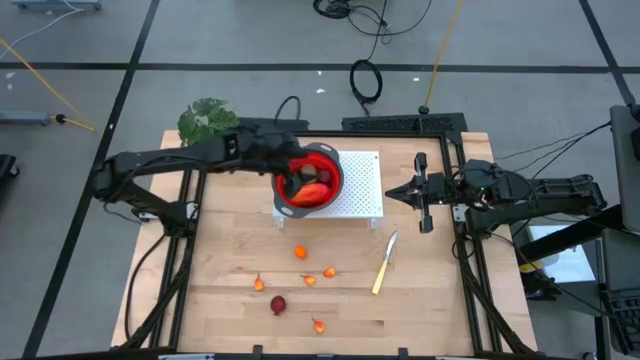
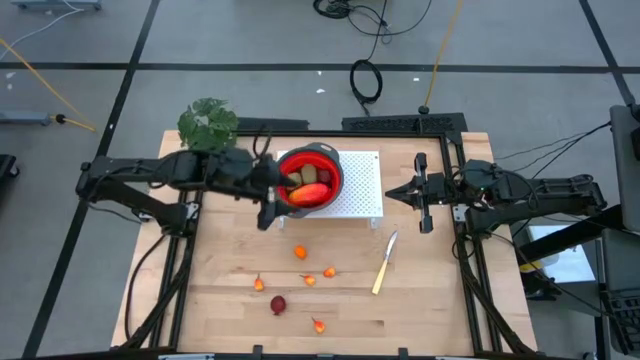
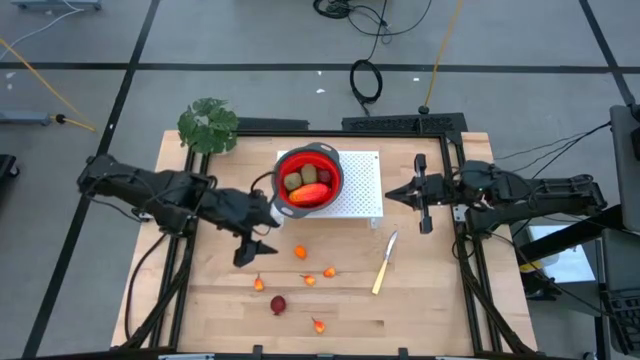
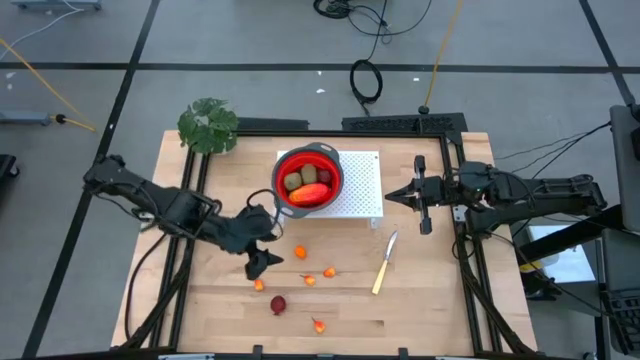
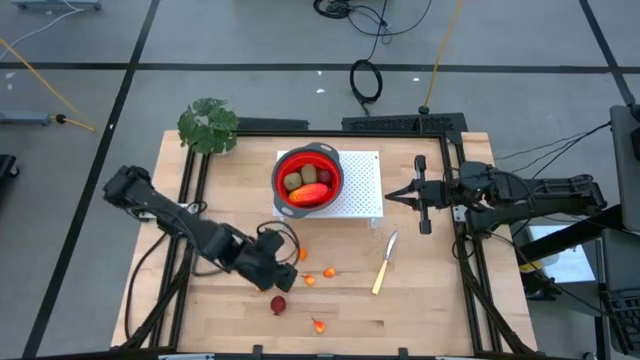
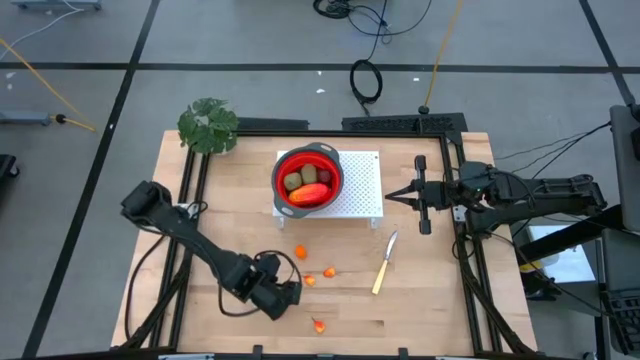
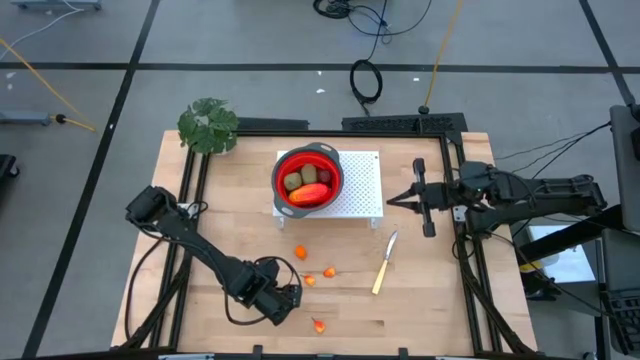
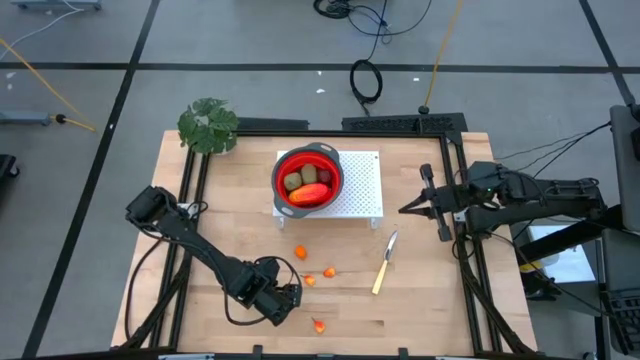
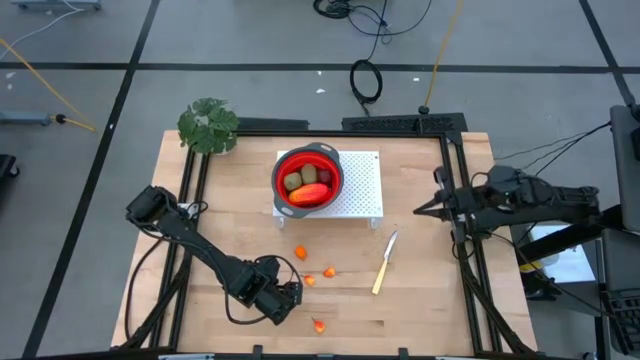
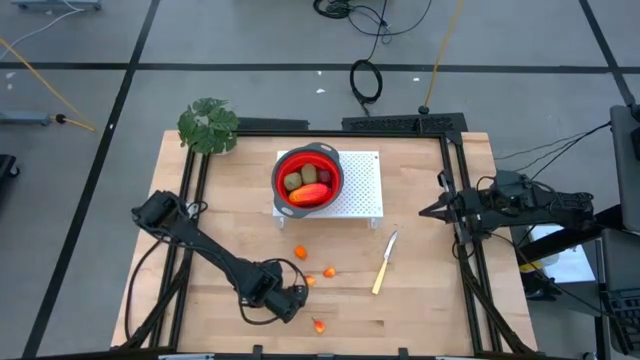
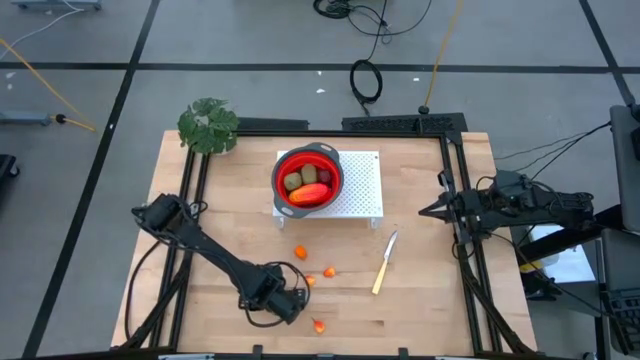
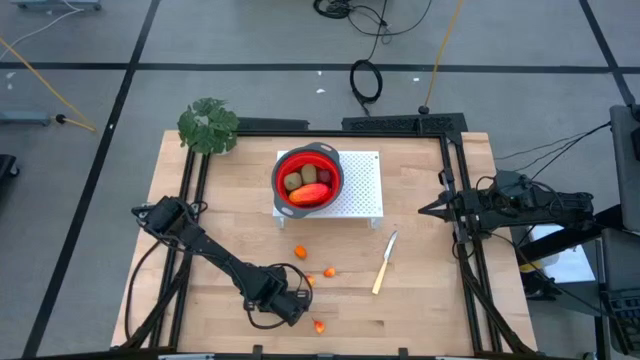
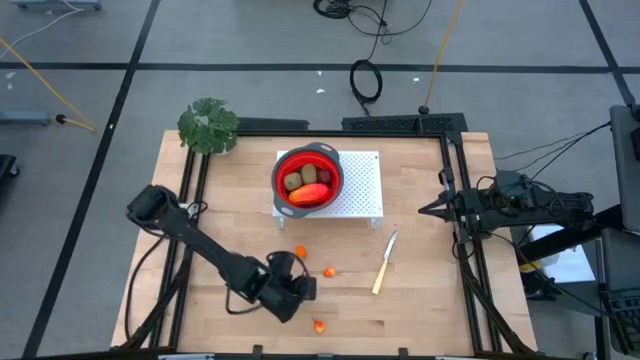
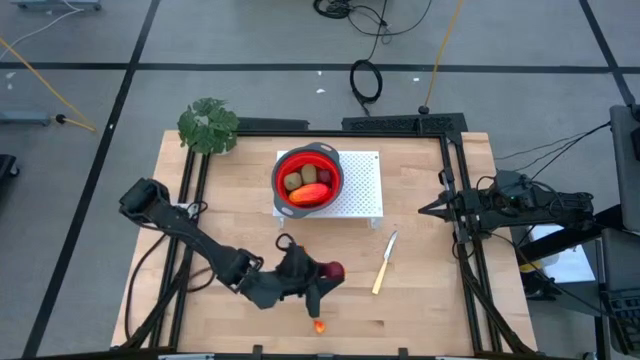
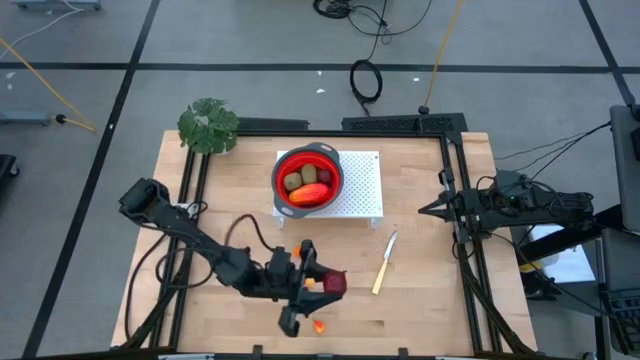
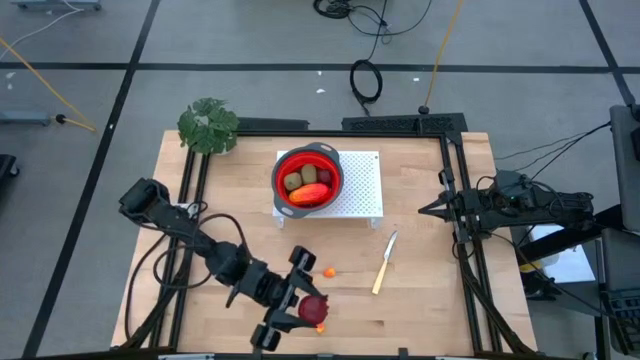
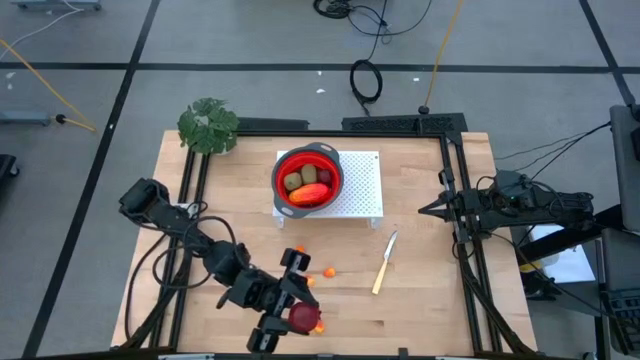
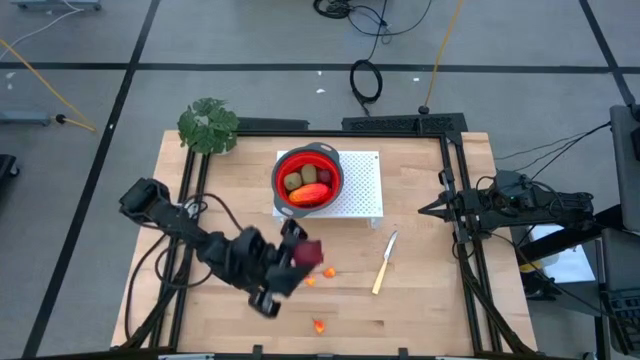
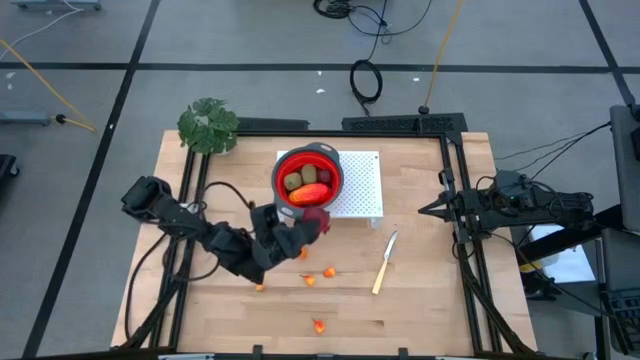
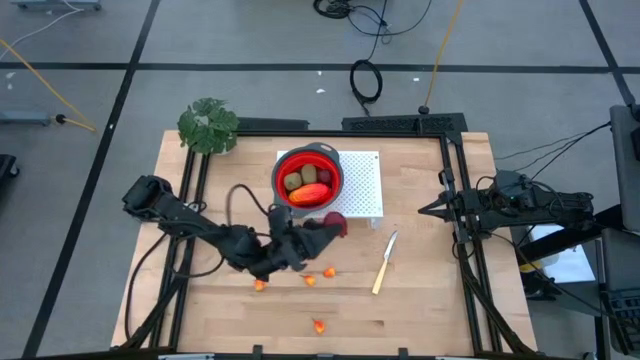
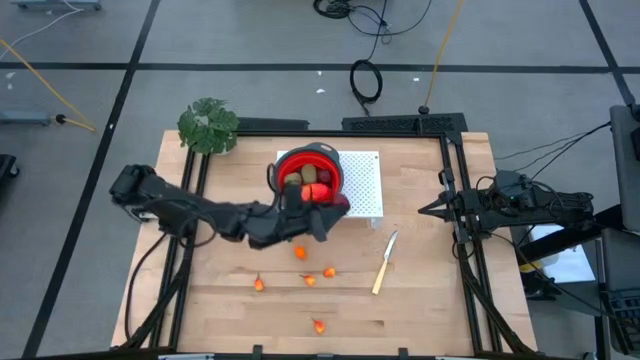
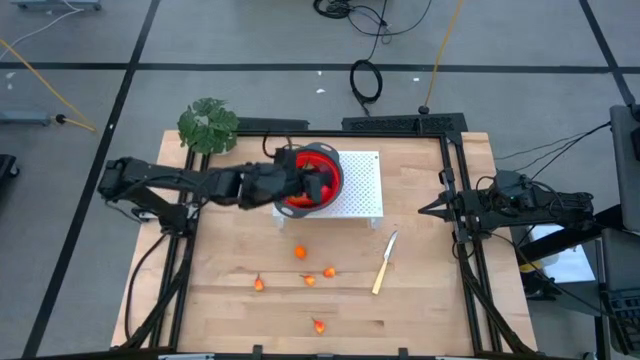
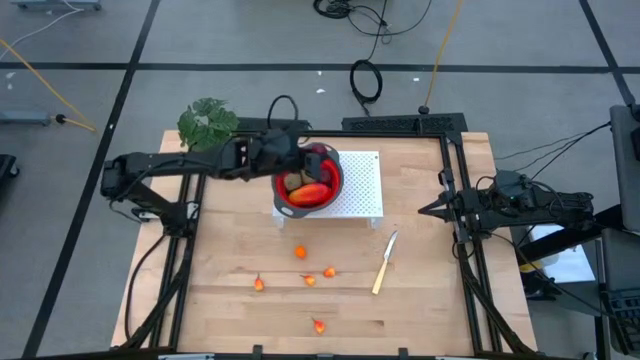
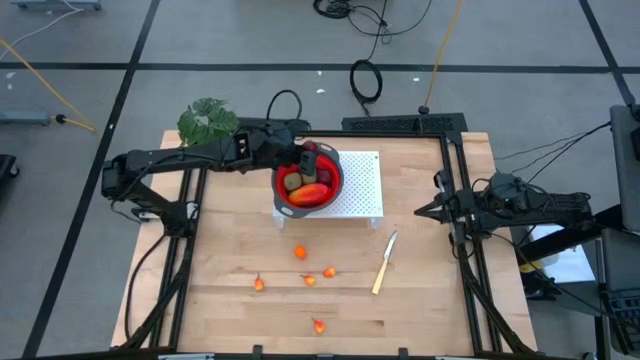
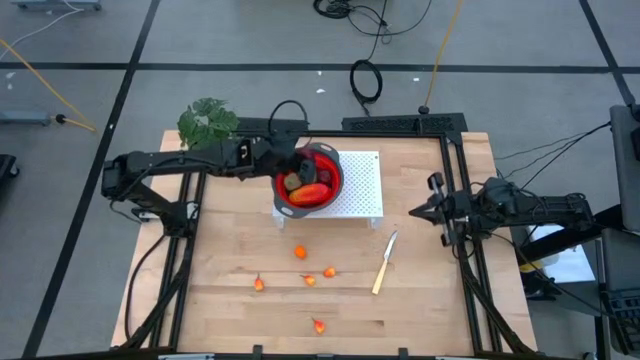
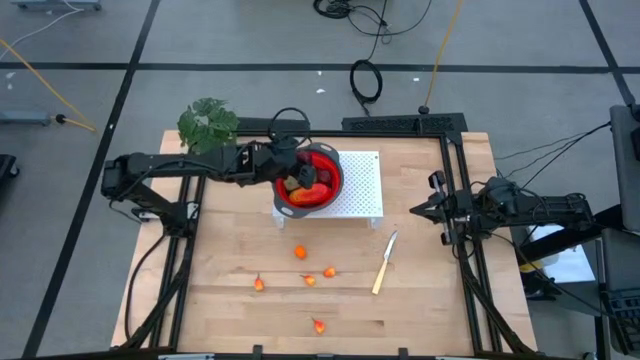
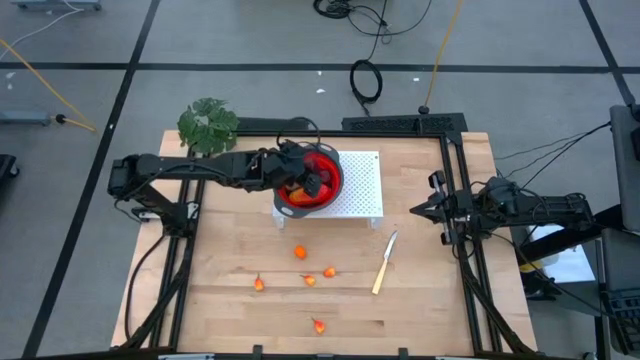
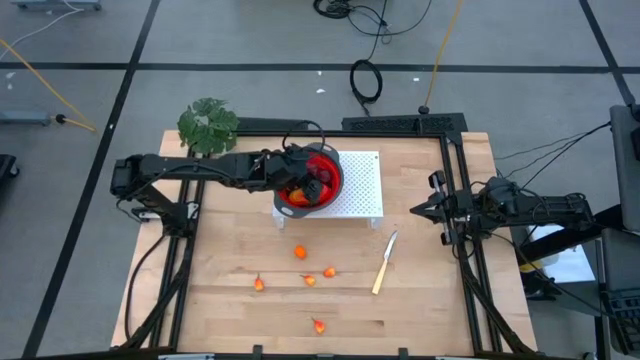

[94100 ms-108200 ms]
Task: Pick & Place Fruit
Put the red pomegranate into the orange strainer bowl on the shelf

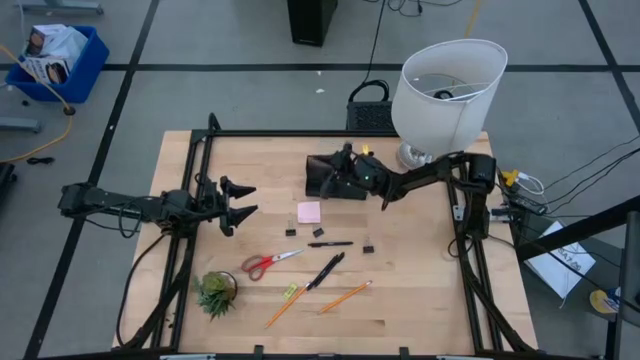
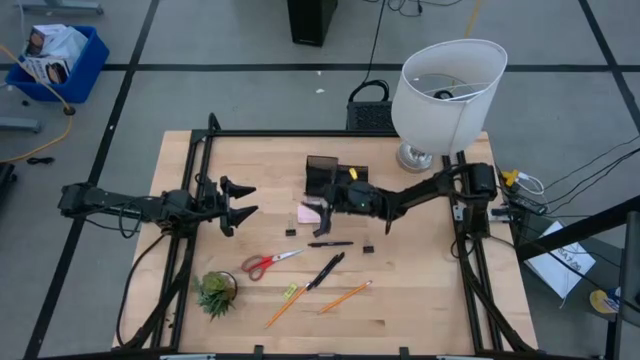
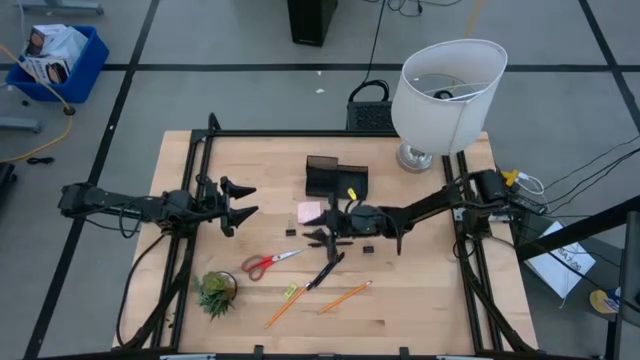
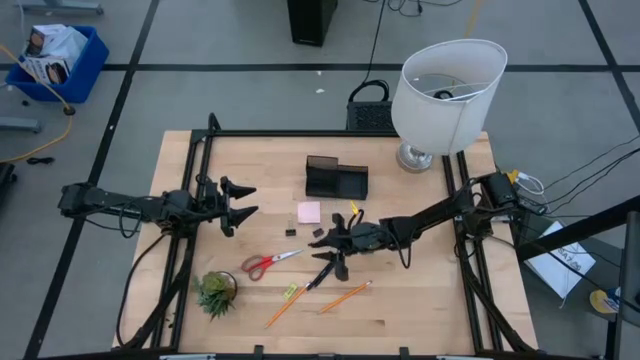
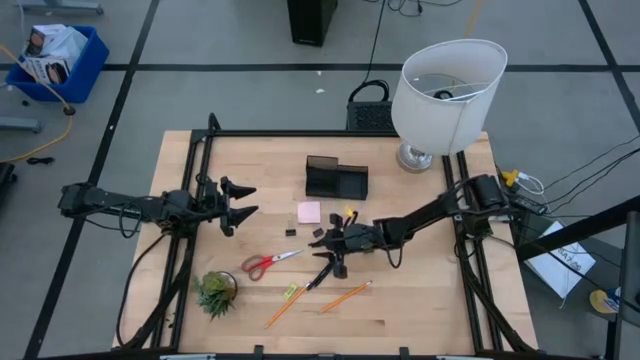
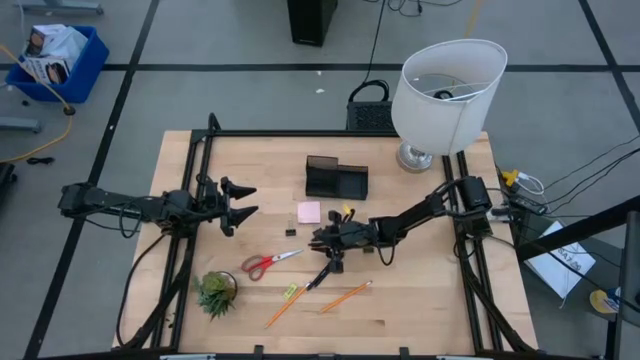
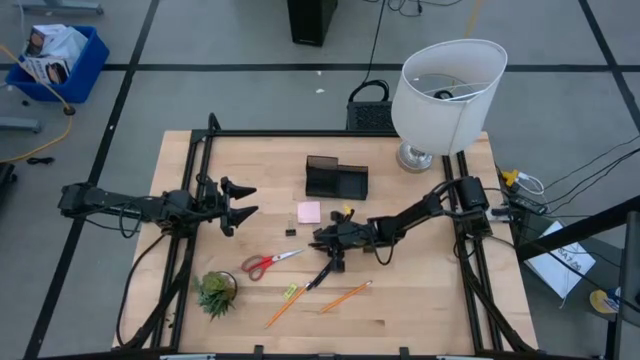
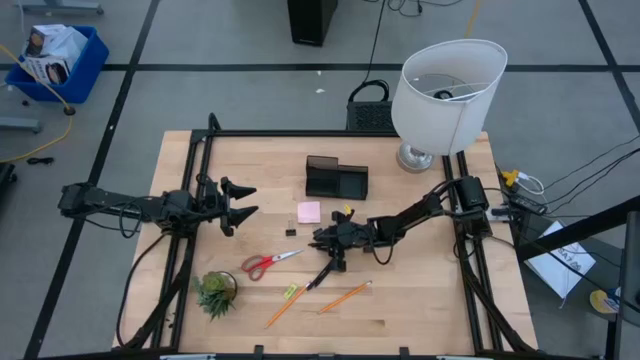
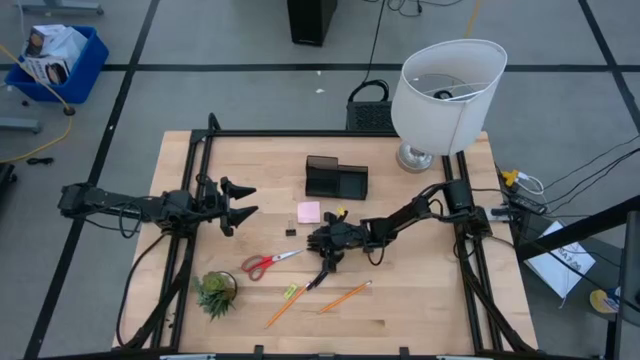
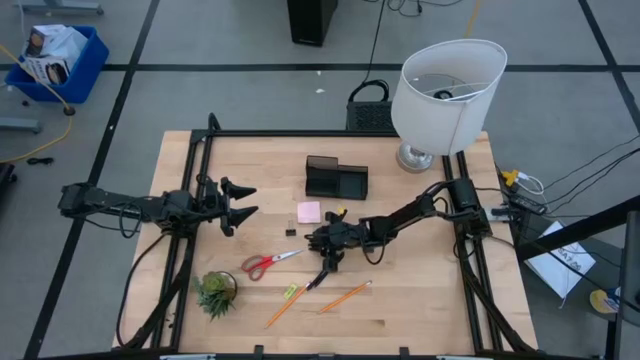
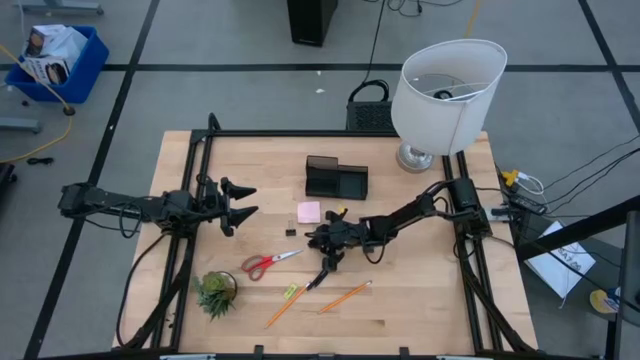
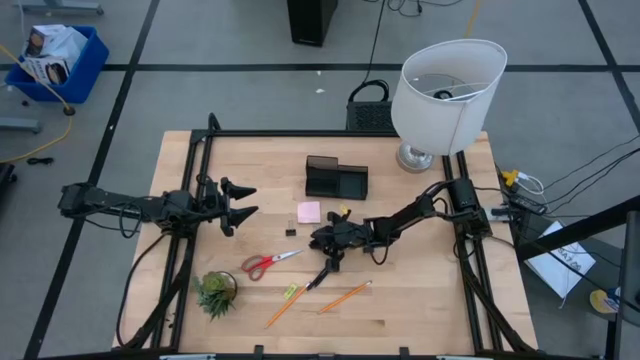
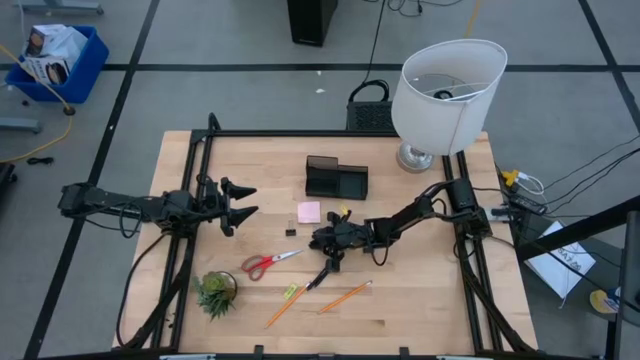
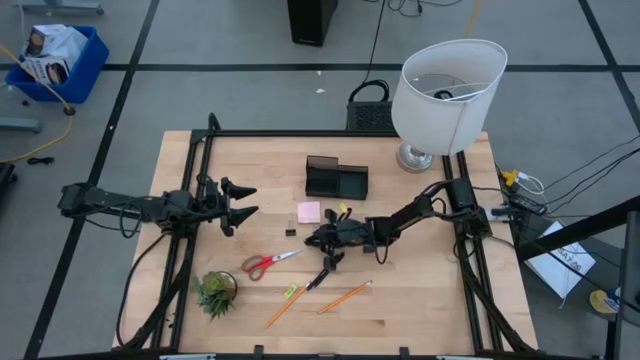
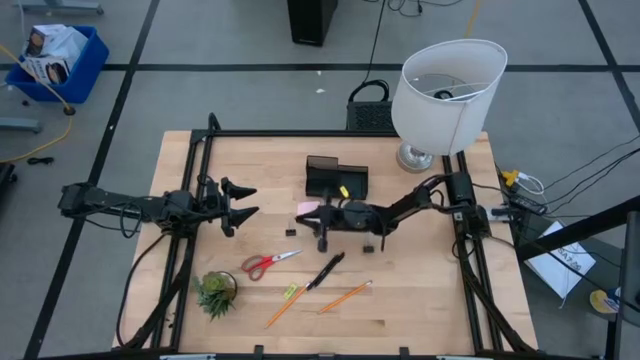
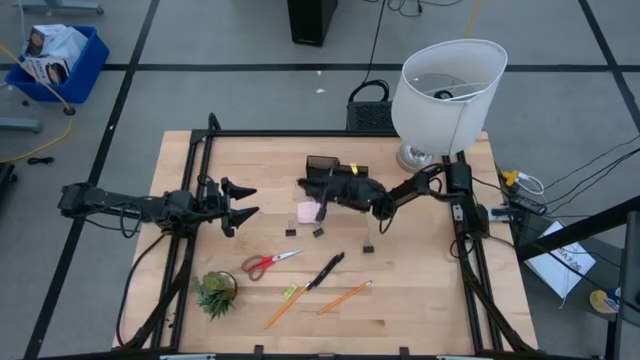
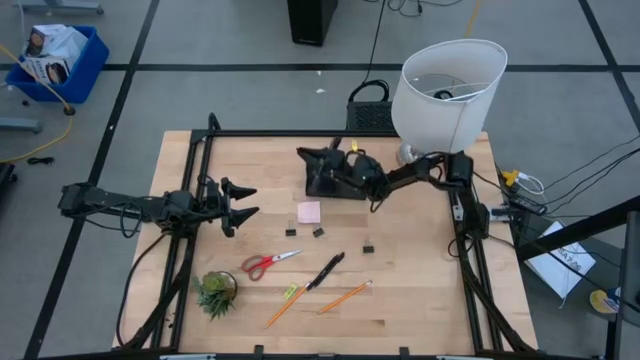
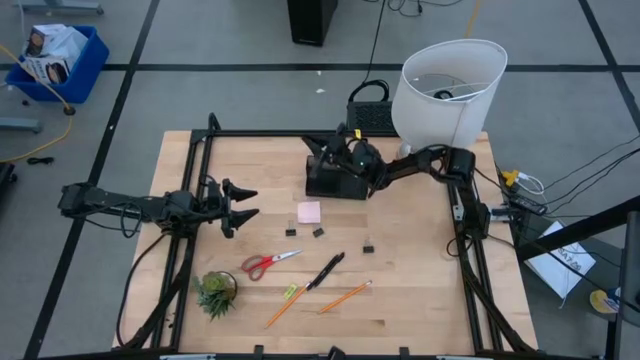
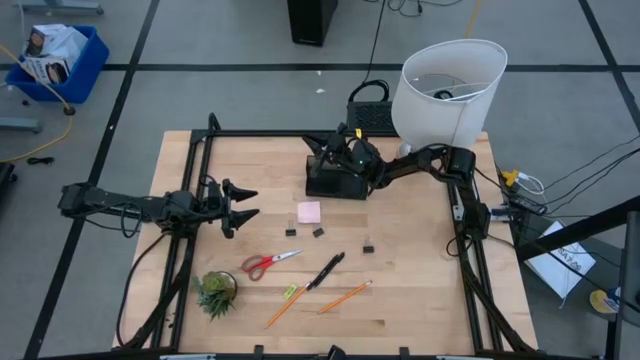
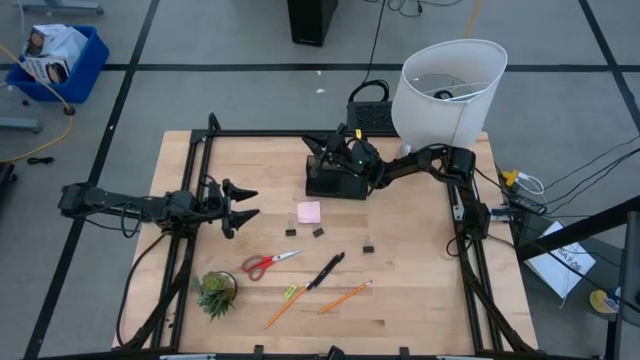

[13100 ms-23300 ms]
Task: Pick and place office supplies into organizer
Put the top black ball pen into the desk organizer
